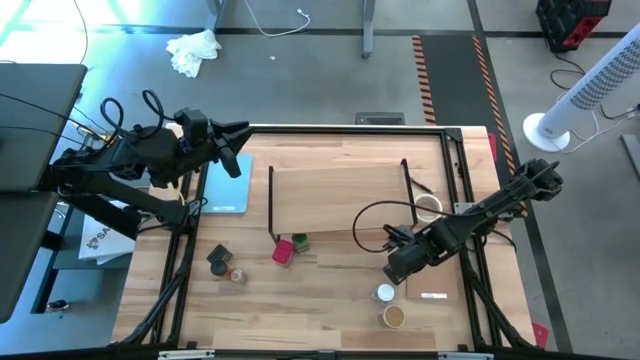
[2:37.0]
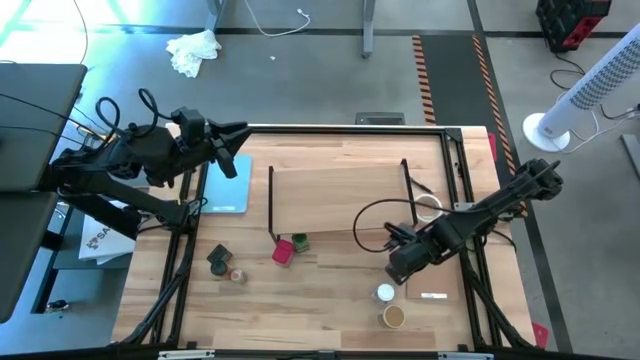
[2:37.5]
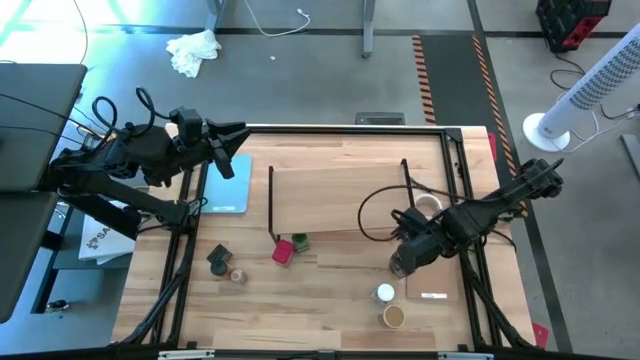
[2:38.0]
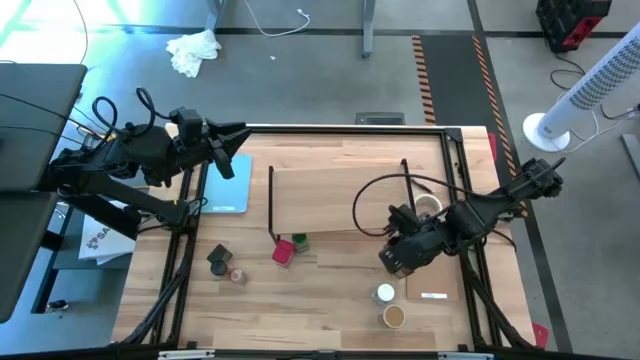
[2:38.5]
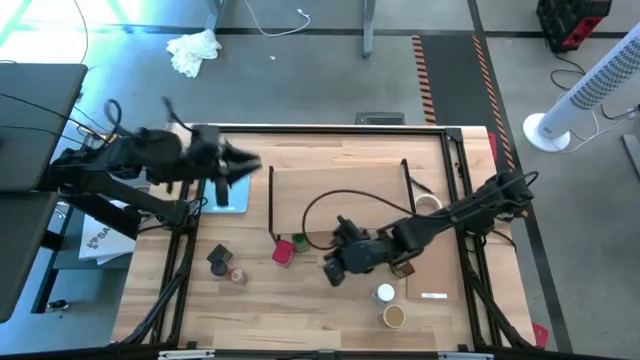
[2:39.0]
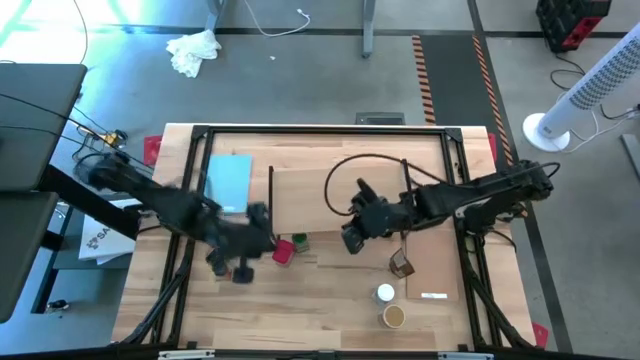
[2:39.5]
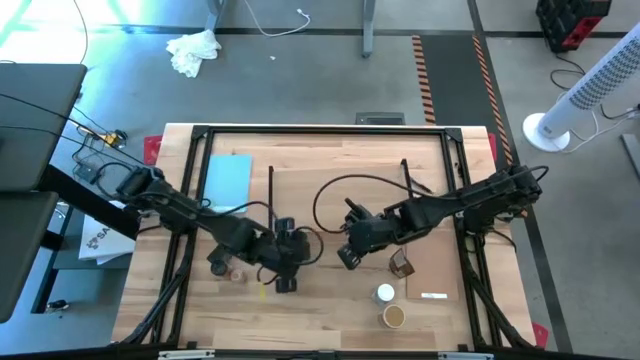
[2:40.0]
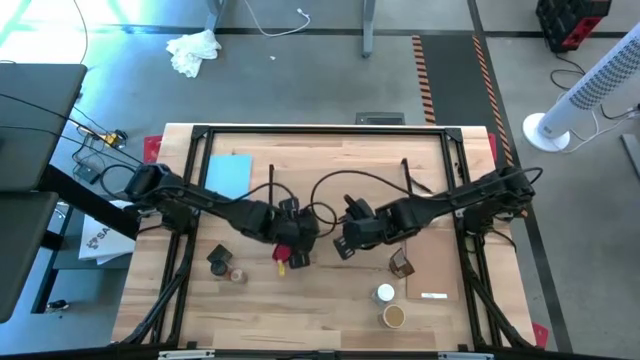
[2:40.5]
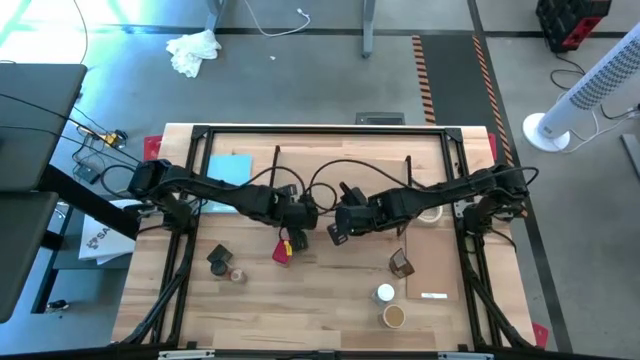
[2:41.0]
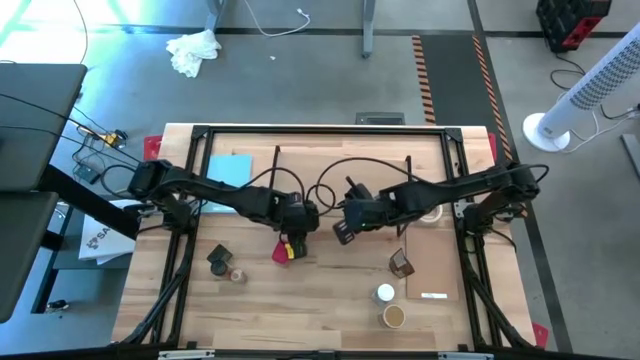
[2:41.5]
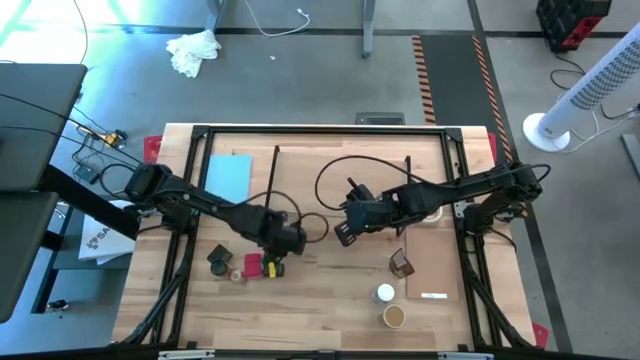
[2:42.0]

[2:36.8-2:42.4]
Task: Shelf spices
Move the green seasoning bottle to the middle left of the table

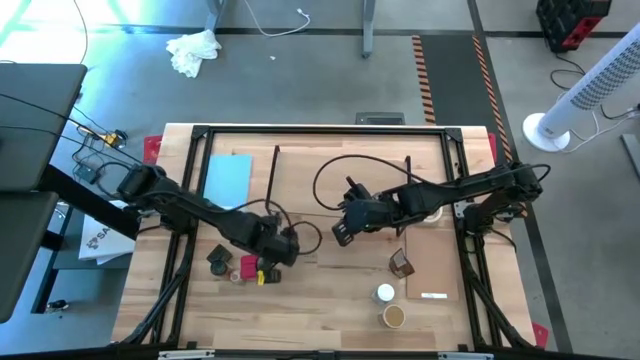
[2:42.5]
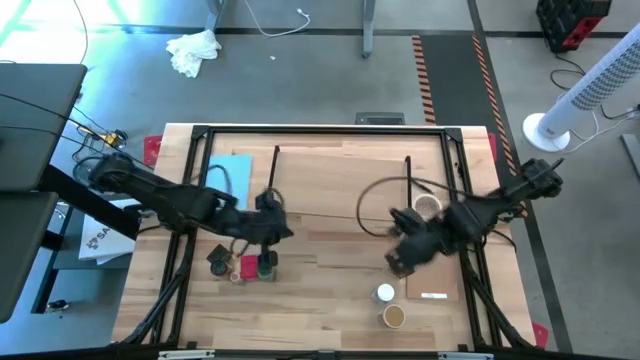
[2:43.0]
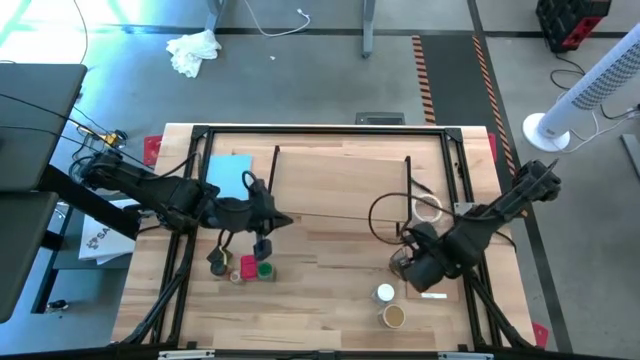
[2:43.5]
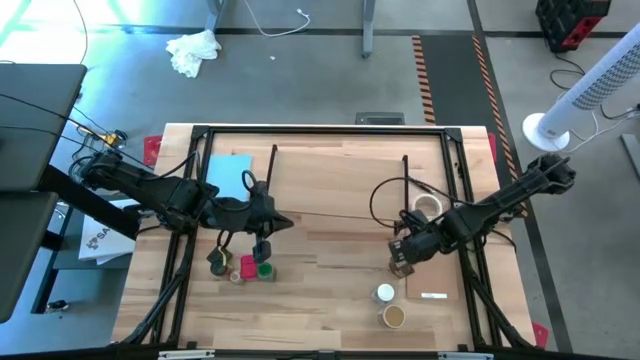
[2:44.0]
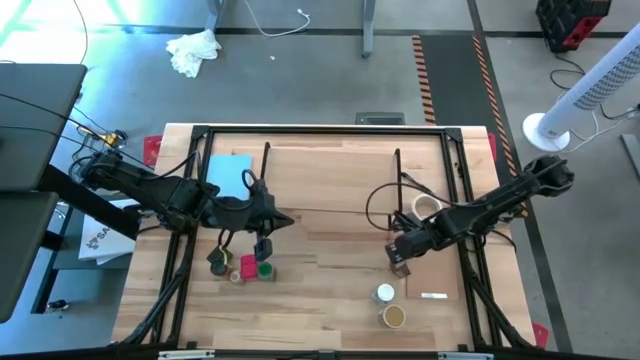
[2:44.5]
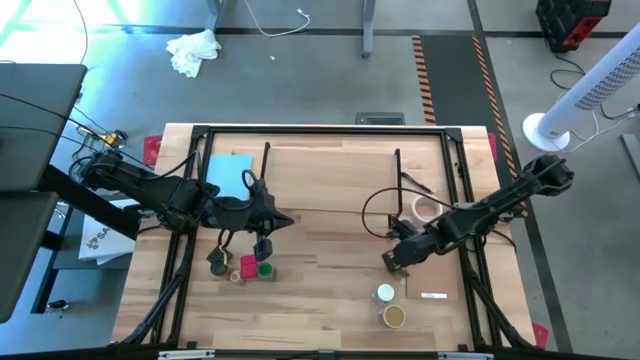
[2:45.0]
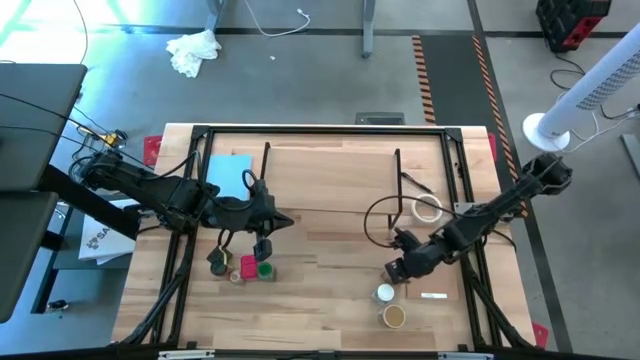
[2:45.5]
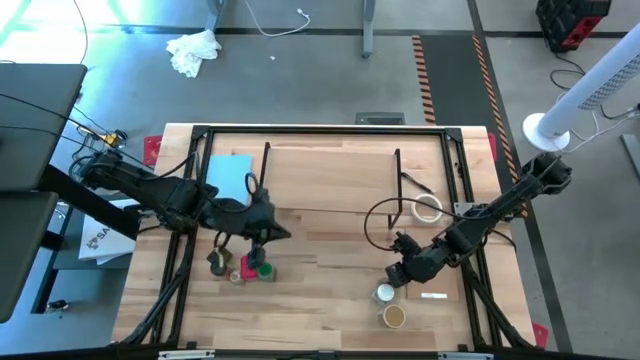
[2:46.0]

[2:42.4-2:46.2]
Move the orange seasoning bag to the bottom right of the table

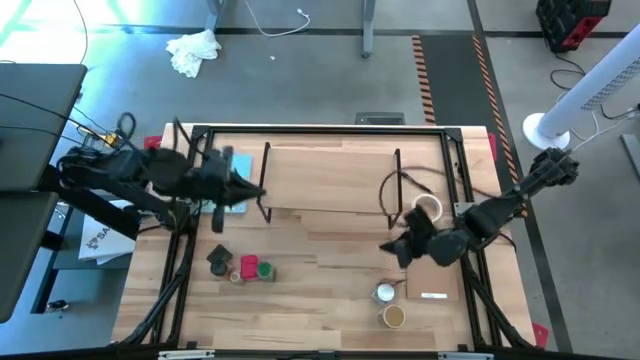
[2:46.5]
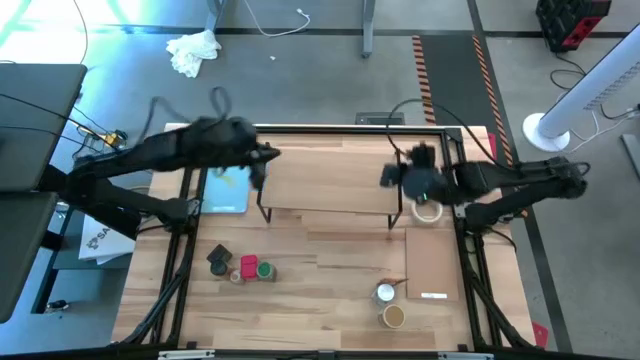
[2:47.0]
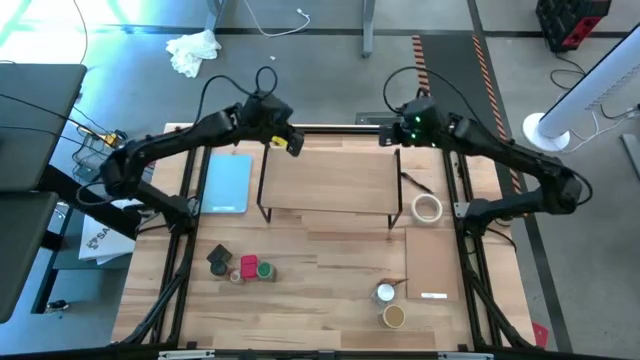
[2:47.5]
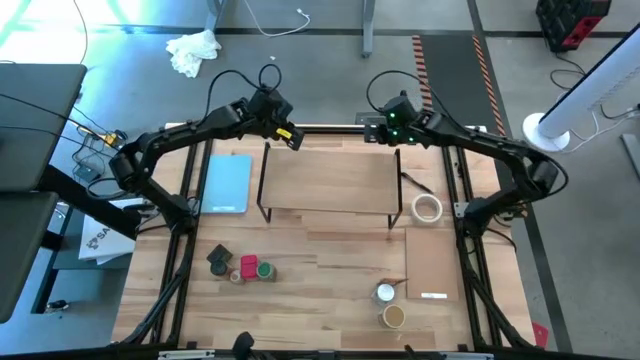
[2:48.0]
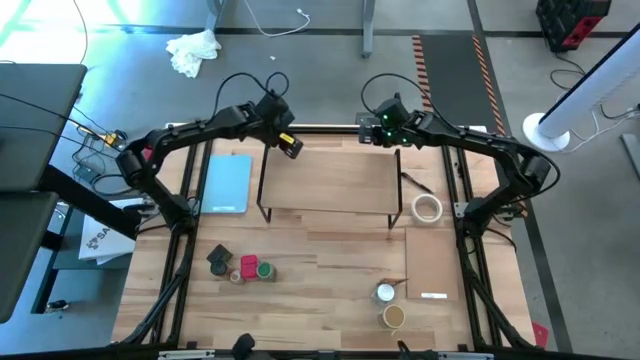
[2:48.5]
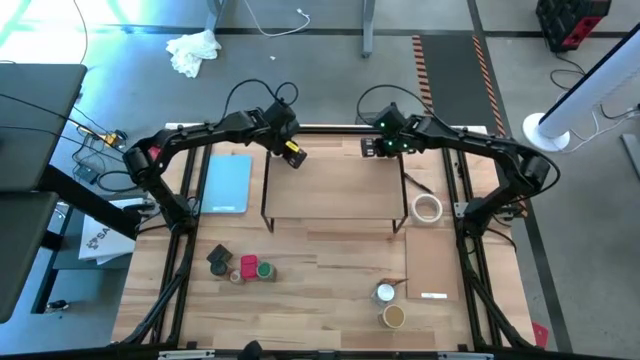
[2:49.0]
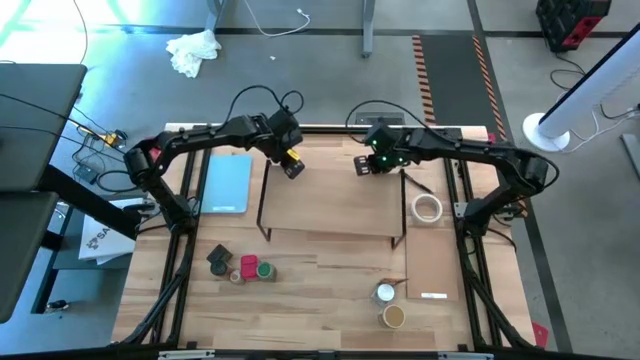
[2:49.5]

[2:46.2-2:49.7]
Adjust the shelf

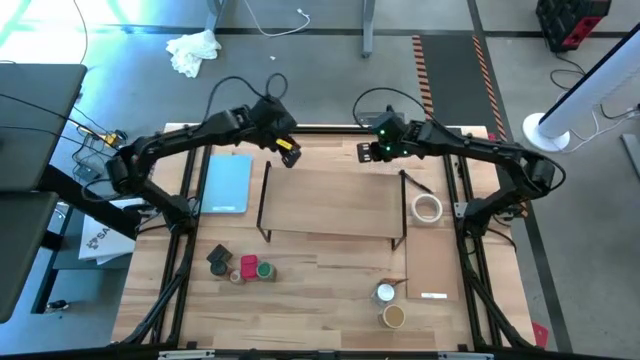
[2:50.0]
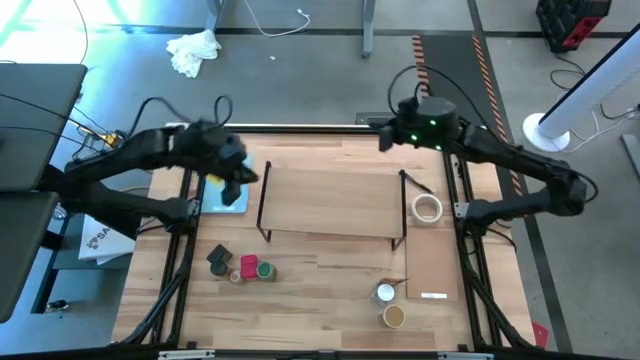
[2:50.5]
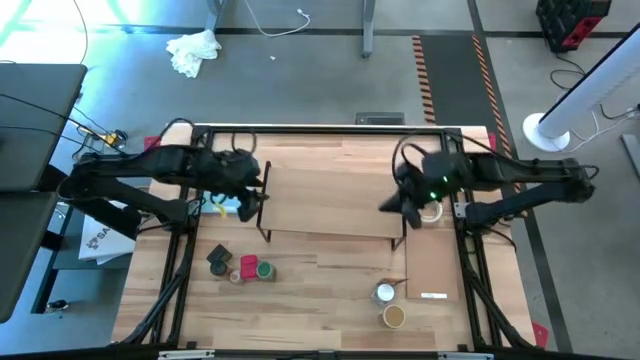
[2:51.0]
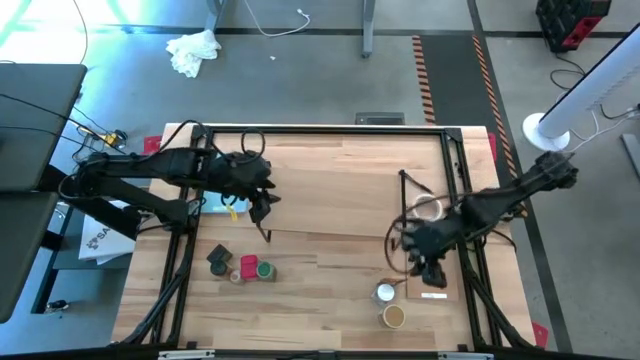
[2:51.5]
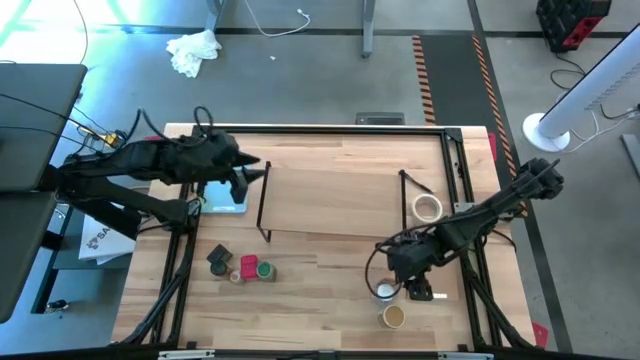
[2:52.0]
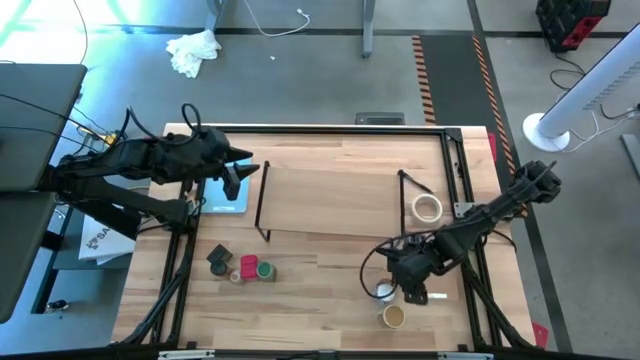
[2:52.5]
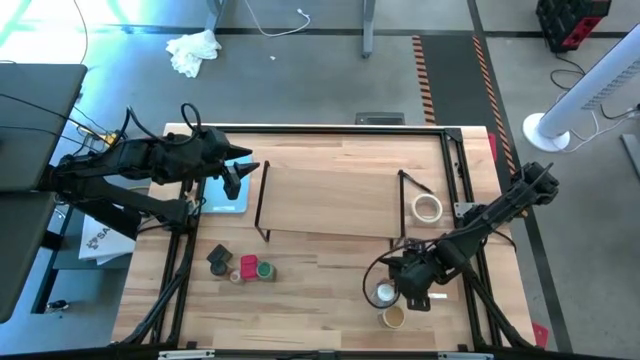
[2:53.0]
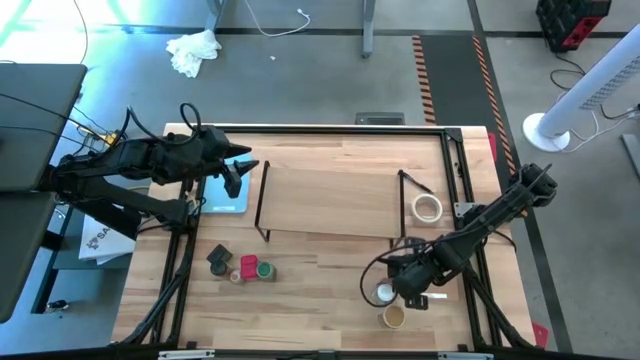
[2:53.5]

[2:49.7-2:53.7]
Put the orange seasoning bag on the shelf

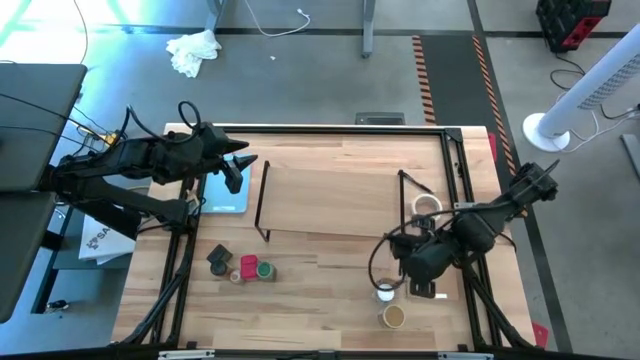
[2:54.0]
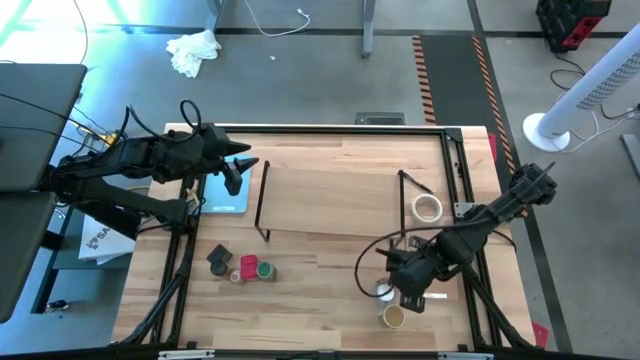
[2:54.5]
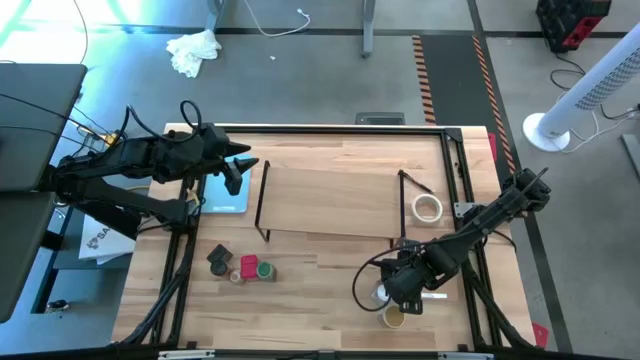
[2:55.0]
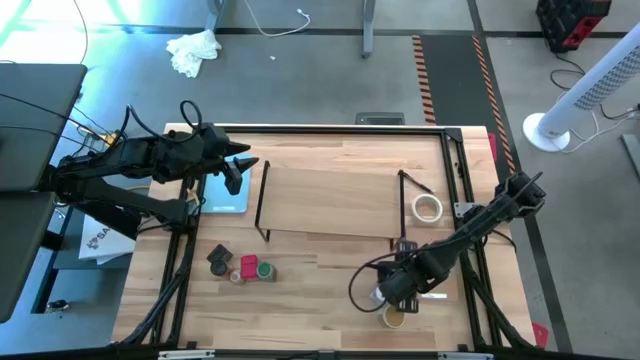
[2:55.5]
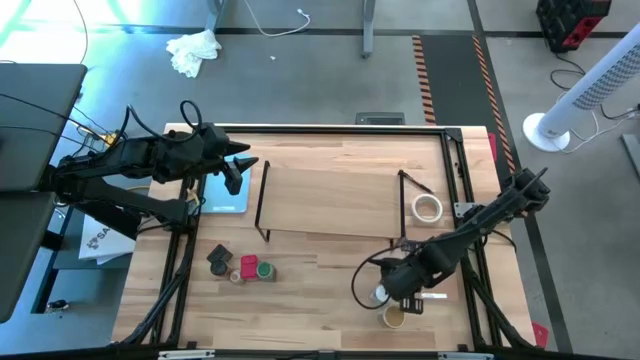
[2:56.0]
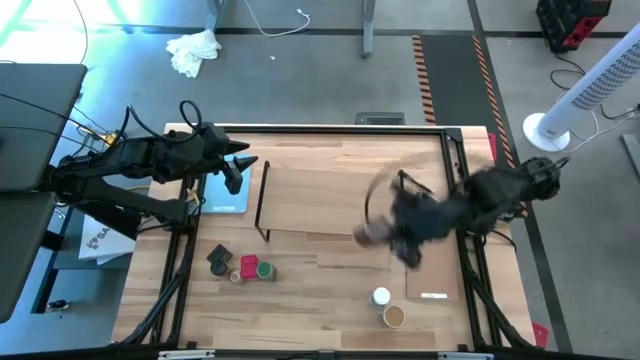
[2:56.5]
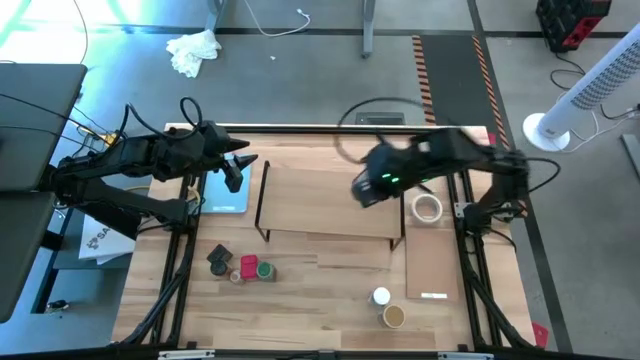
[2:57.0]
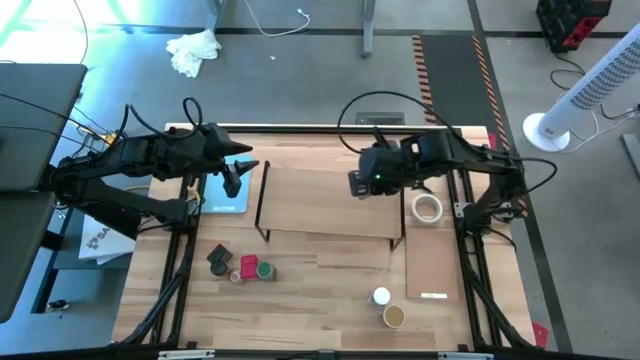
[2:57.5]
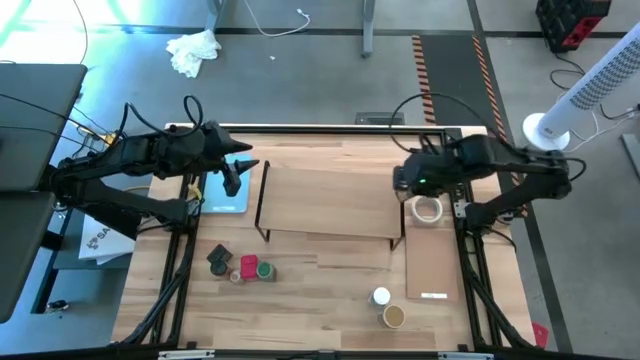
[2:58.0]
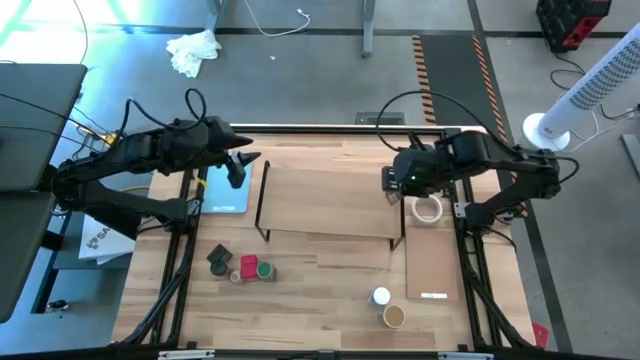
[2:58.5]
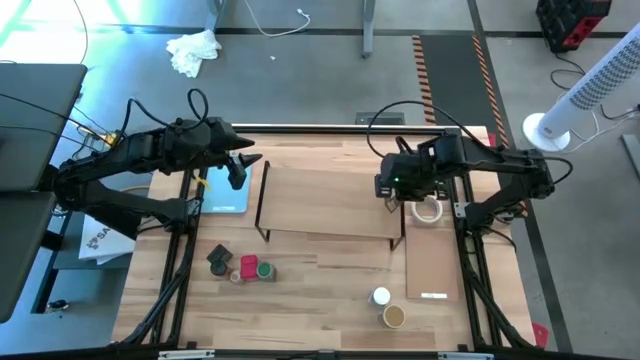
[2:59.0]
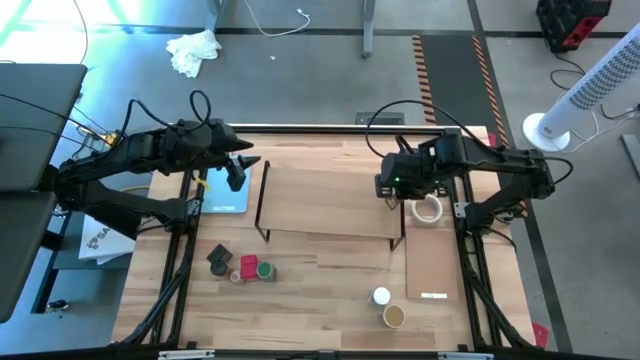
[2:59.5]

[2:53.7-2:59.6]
Put the orange seasoning bag on the shelf
